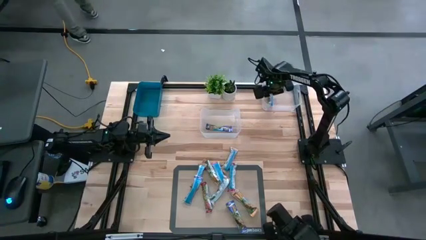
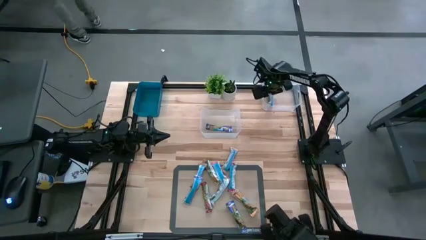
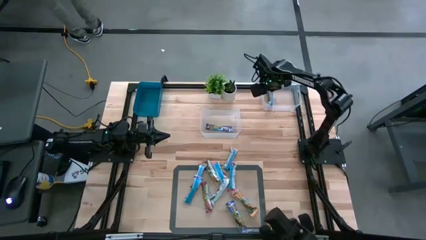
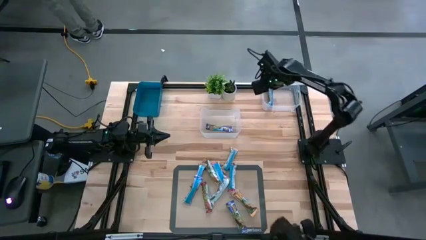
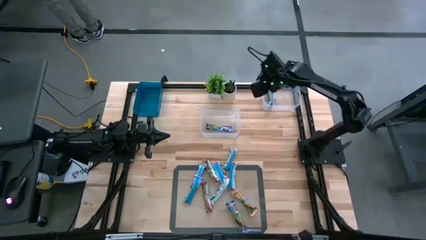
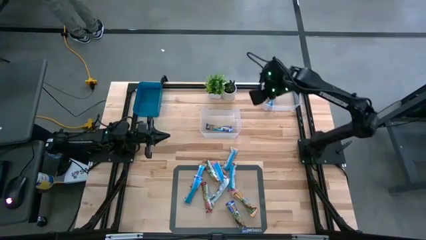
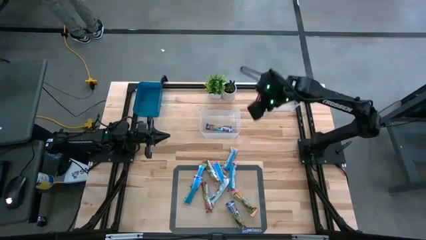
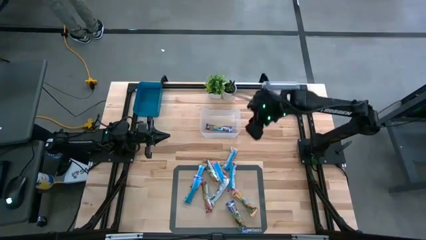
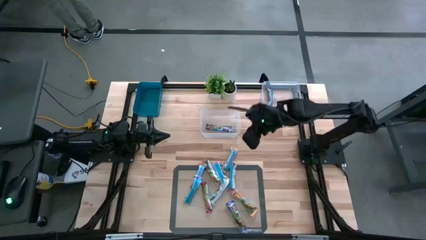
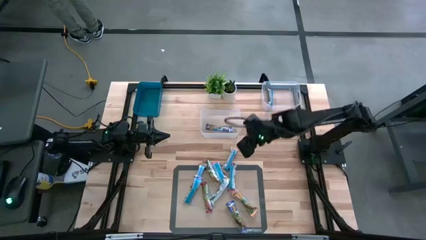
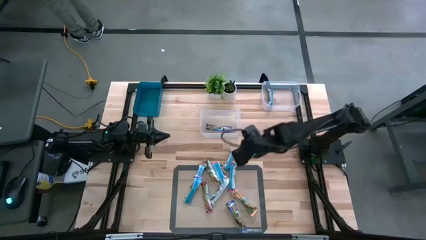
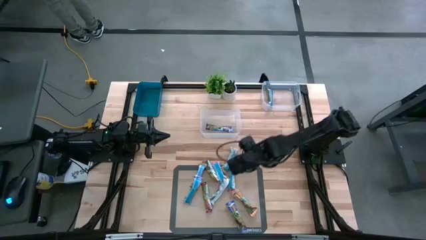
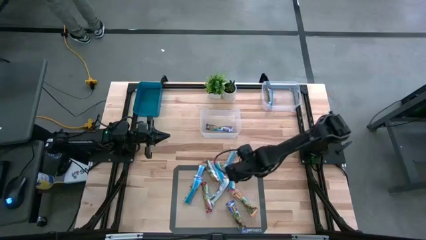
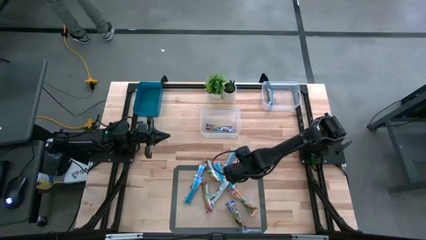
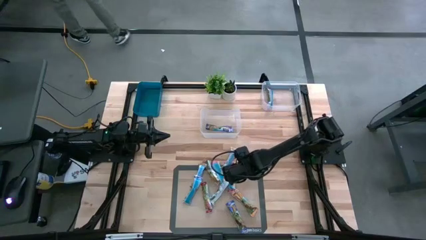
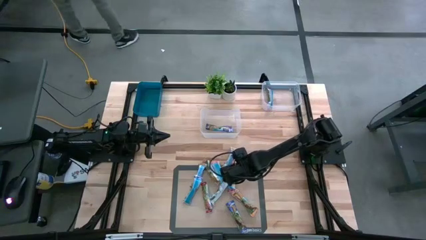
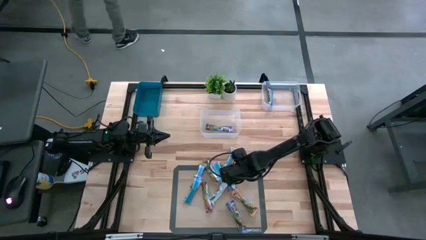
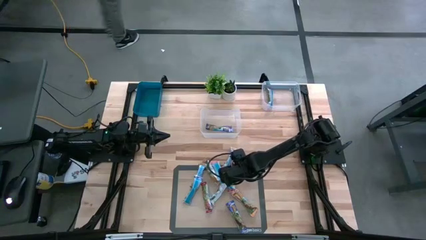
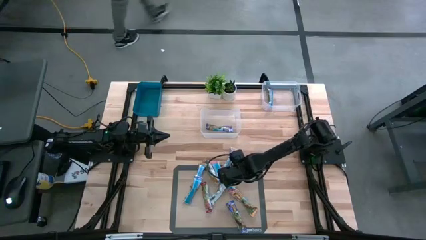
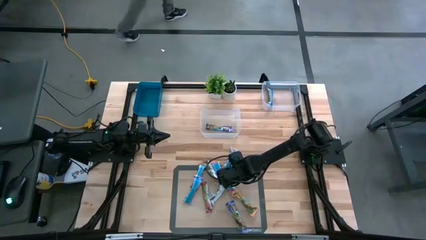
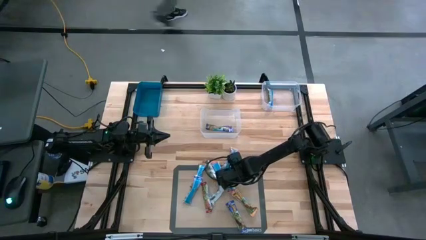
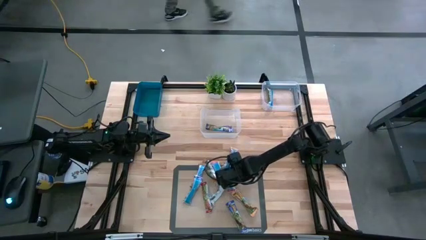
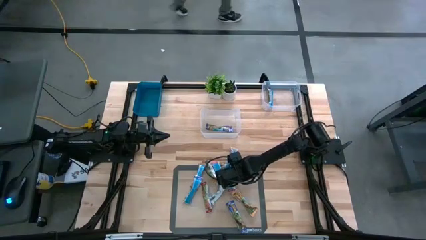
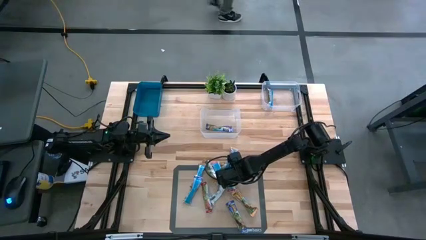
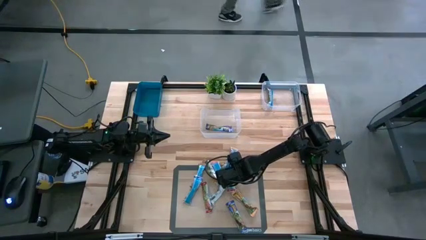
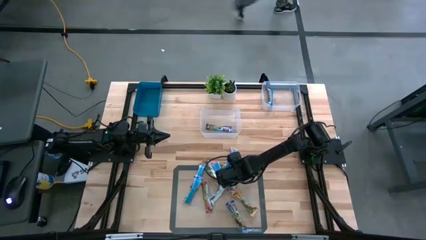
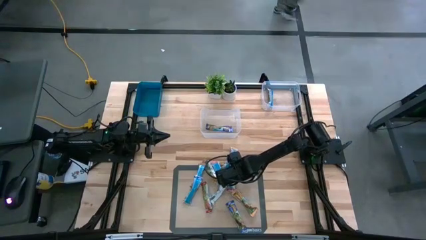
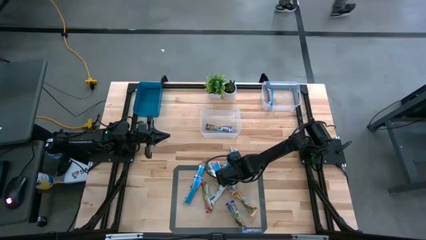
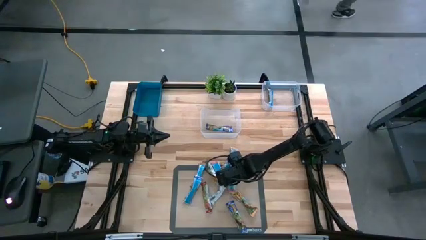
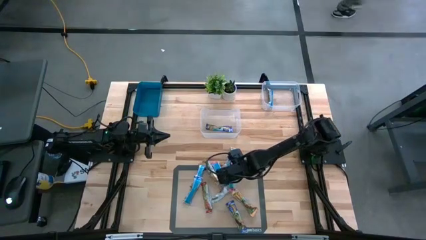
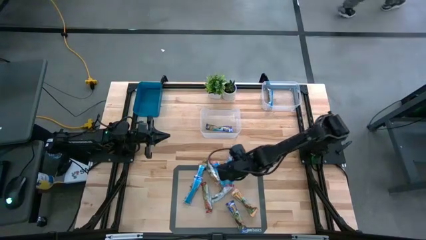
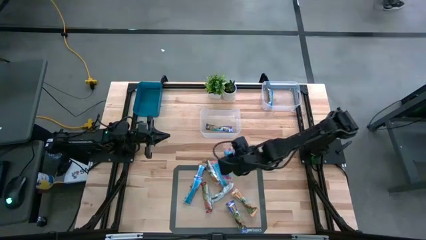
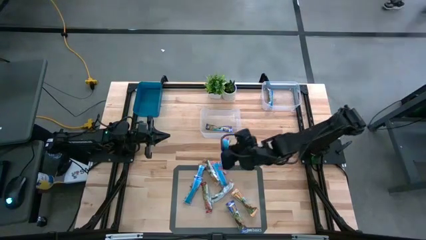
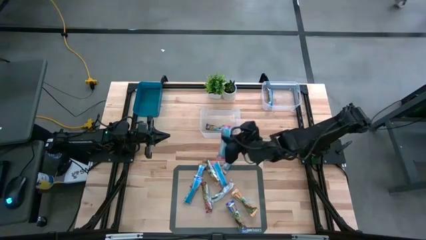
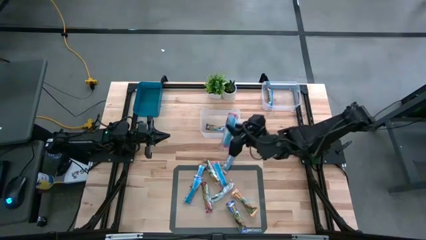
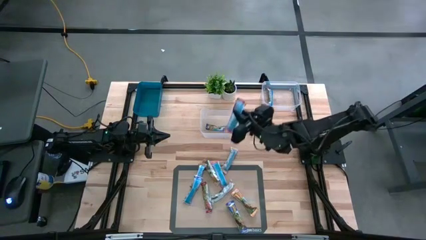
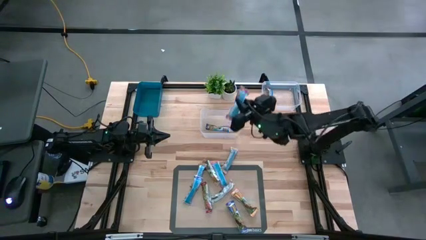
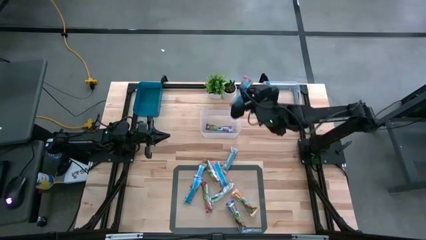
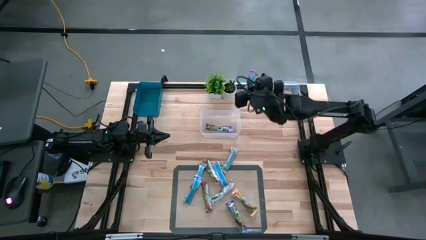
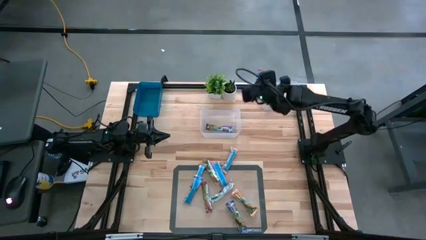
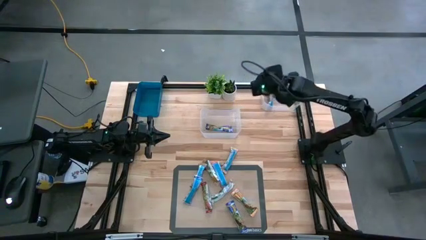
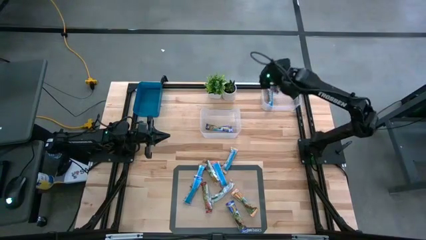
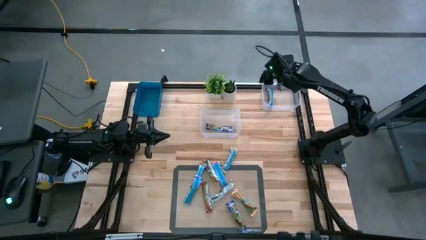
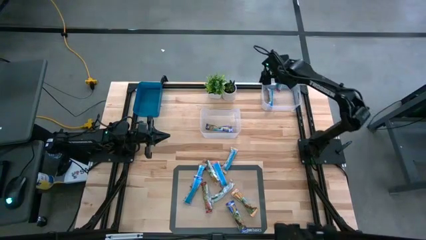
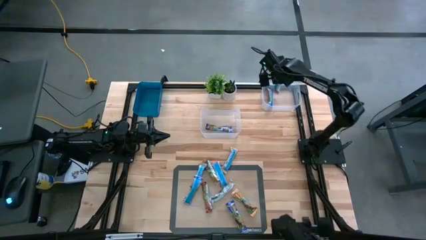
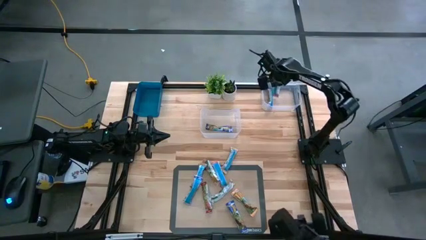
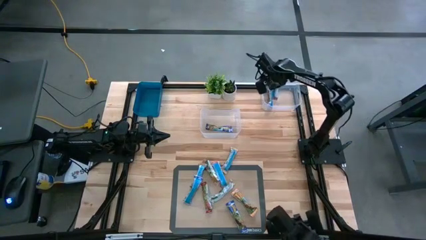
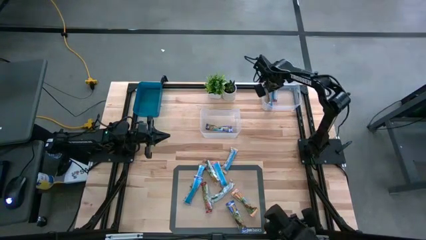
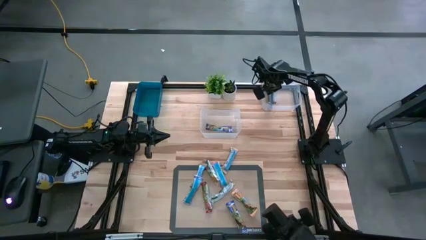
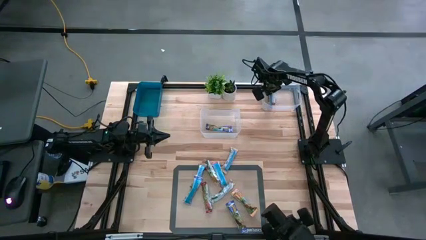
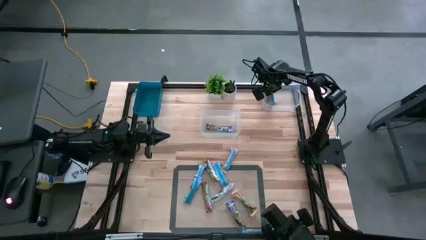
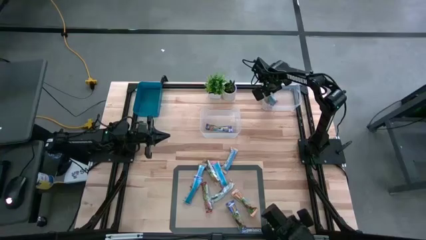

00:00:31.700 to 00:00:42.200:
Task: Pick and place Granola Bars by type
Put the red granola bar in the right transparent bin
